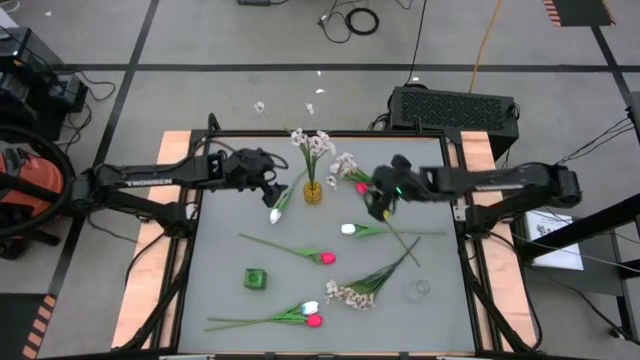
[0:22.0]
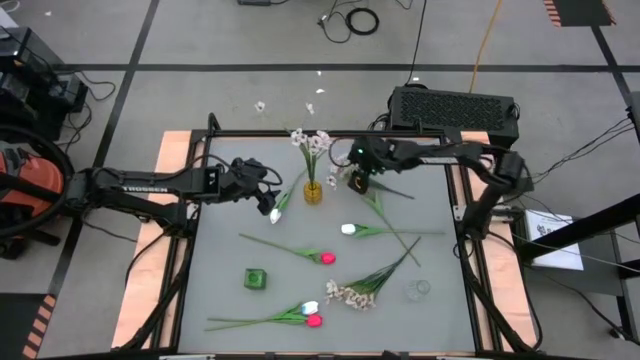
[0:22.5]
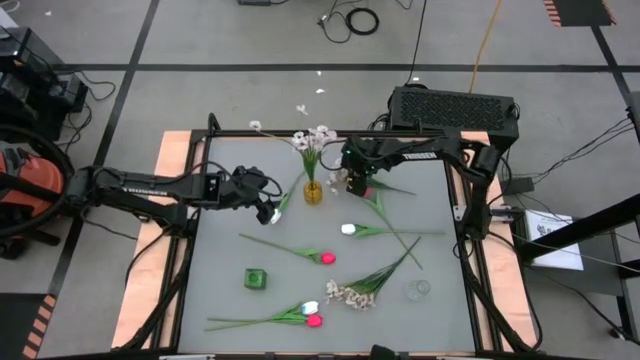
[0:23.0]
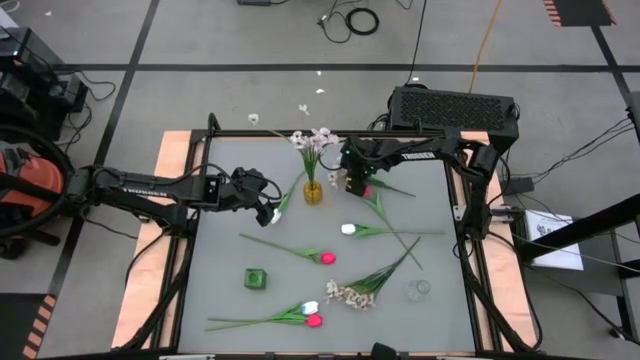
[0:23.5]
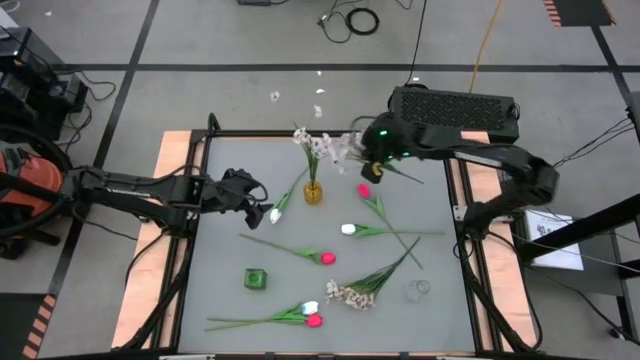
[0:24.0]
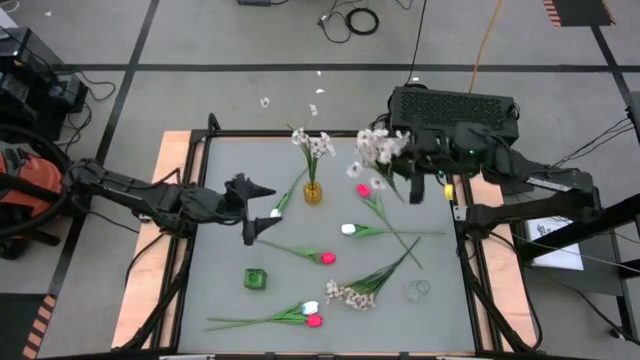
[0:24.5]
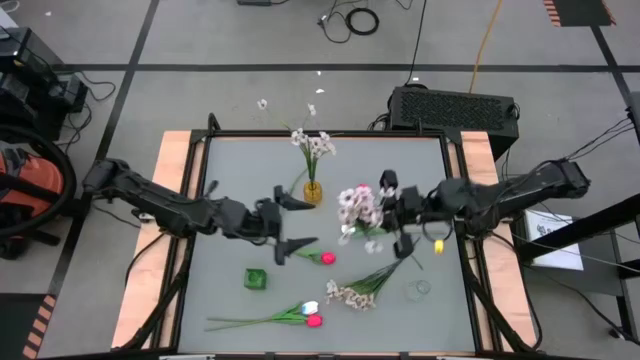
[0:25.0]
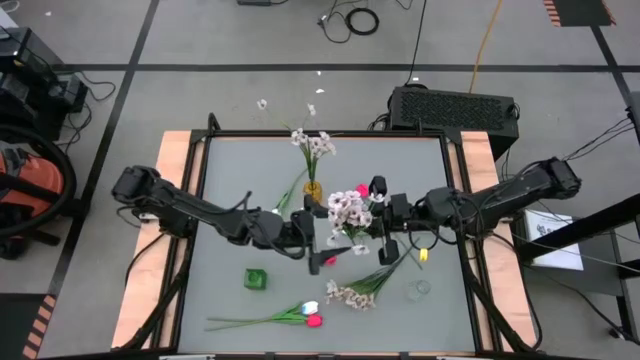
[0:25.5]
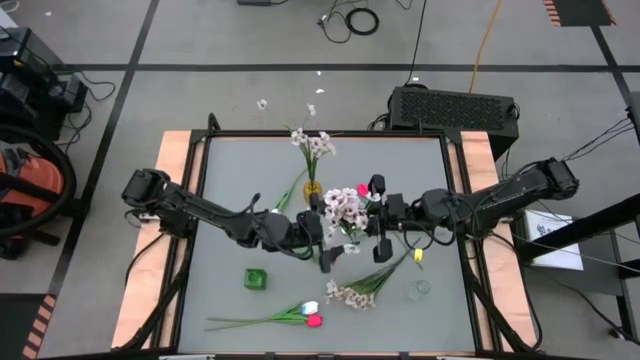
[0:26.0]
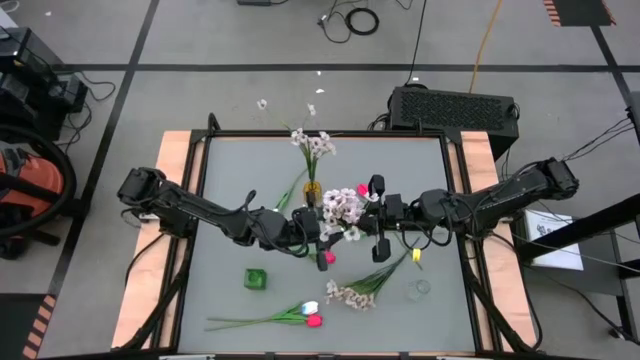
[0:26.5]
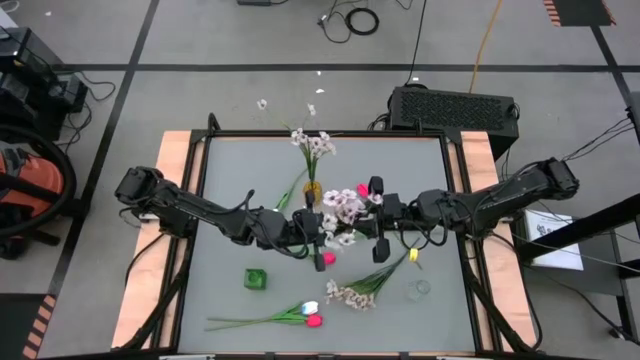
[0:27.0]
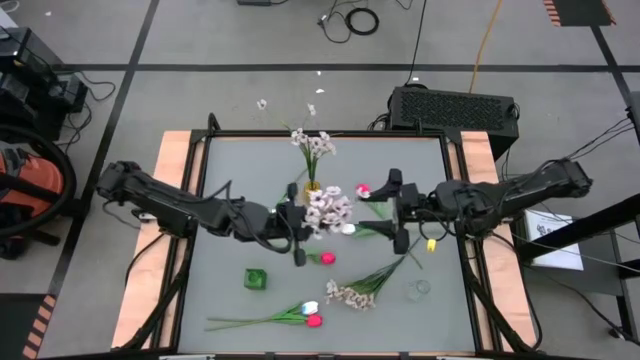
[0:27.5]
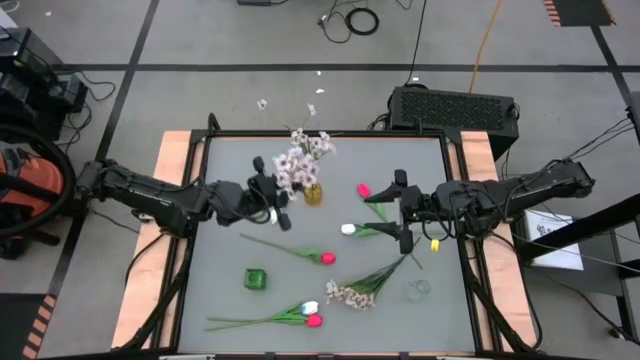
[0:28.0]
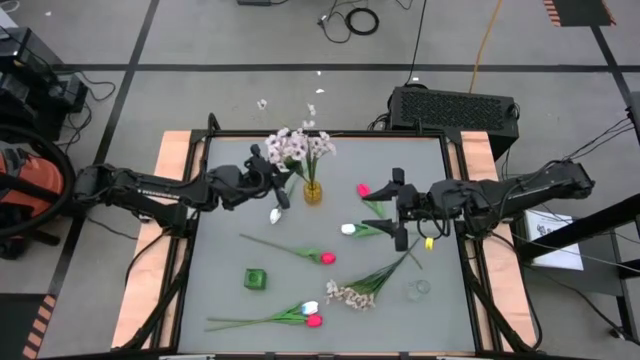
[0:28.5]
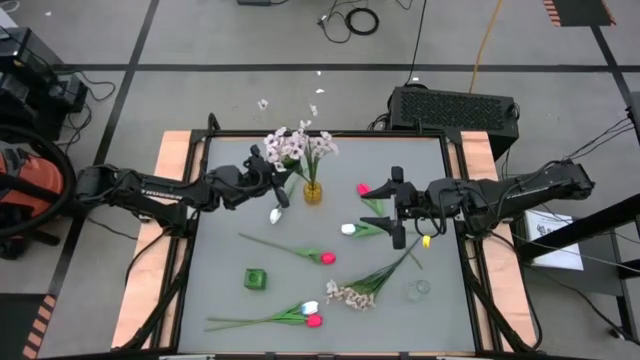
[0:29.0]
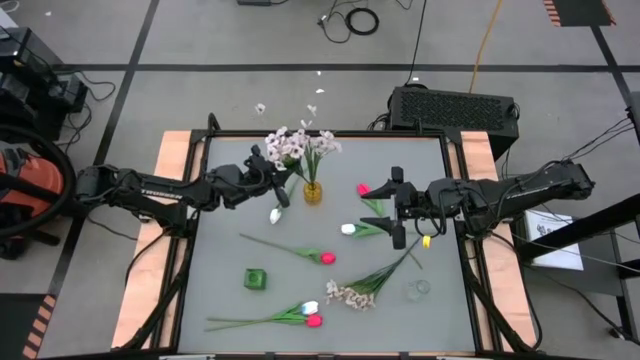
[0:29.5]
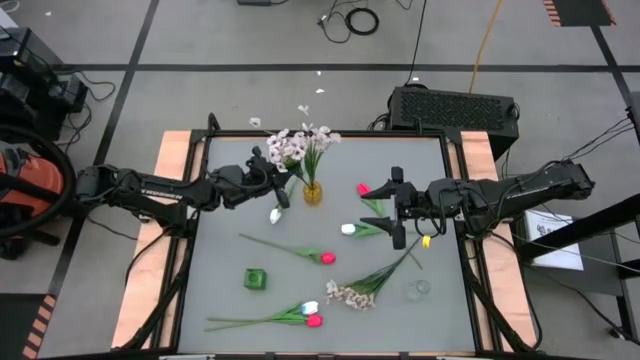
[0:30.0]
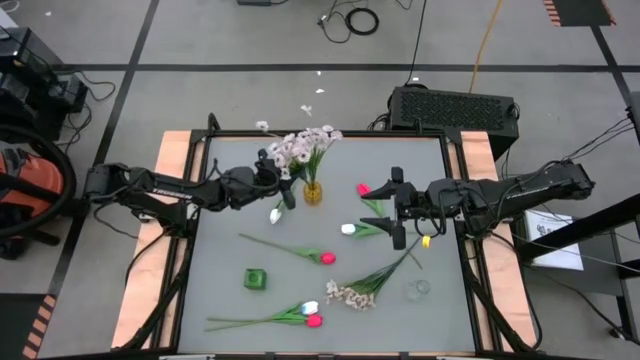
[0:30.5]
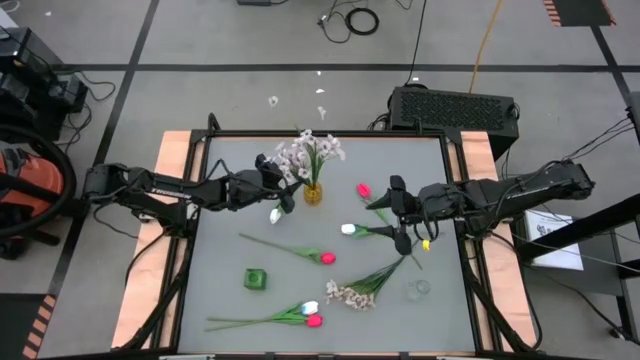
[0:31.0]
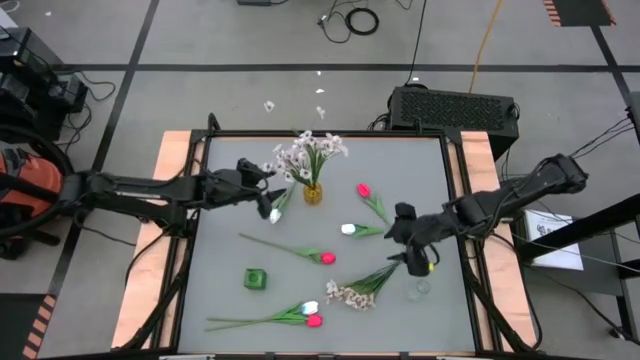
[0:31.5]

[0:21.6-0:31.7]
Task: Sort flowers into vase by color
Put the top white flowers into the yellow vase

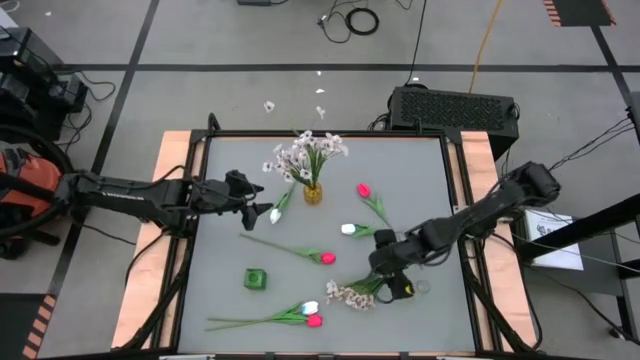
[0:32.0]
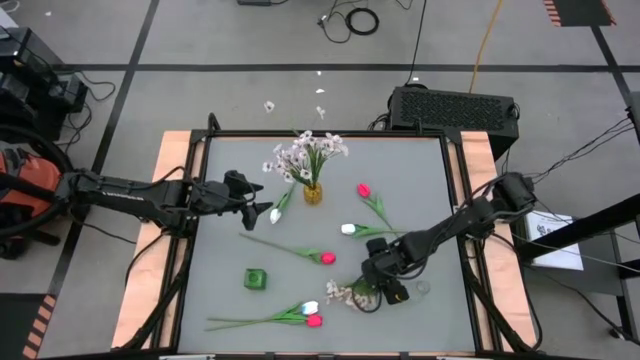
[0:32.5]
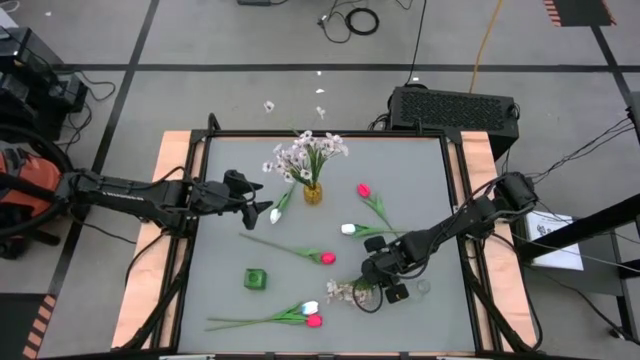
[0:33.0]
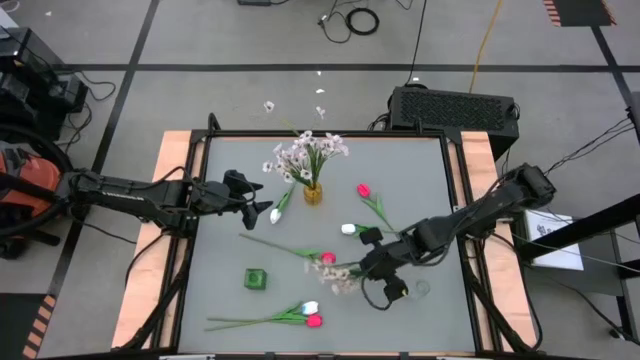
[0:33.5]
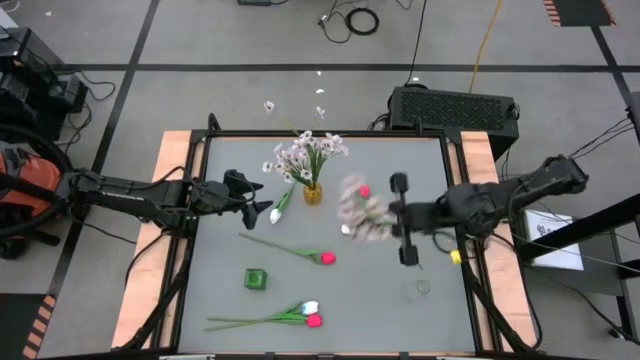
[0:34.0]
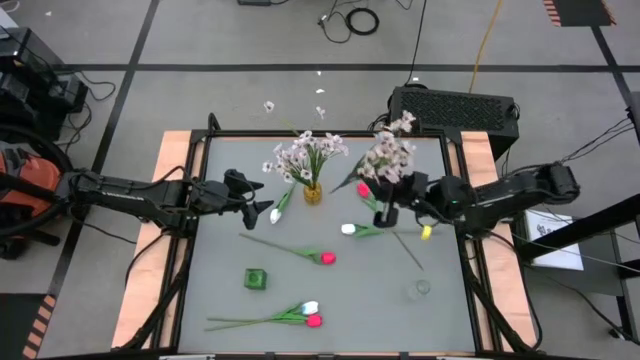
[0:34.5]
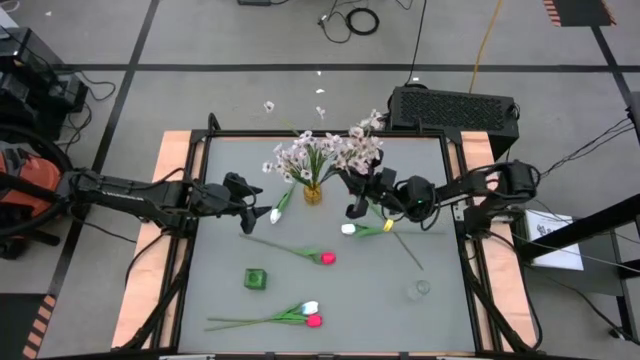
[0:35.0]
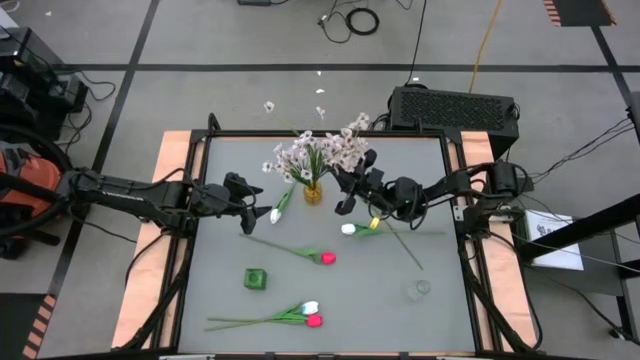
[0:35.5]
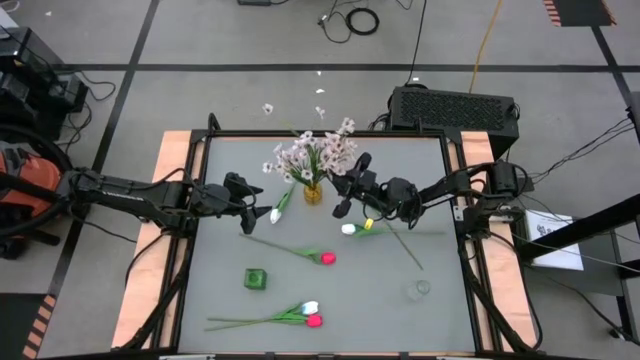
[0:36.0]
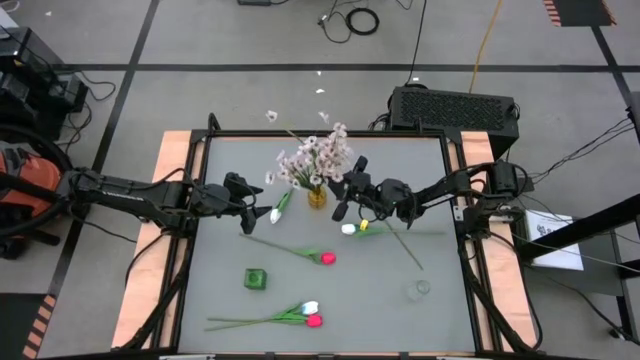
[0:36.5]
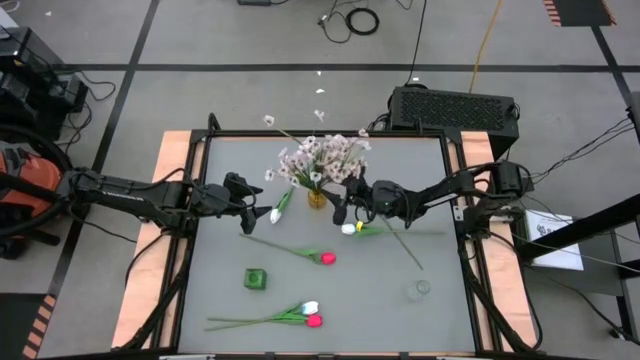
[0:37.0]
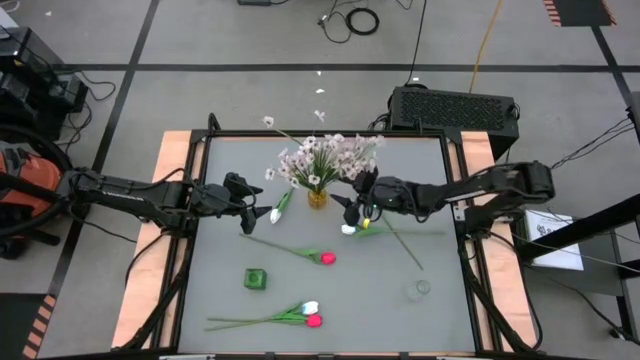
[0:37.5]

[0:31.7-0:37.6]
Put the white flowers into the yellow vase

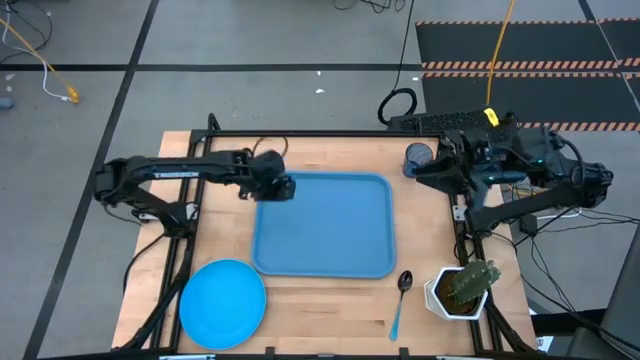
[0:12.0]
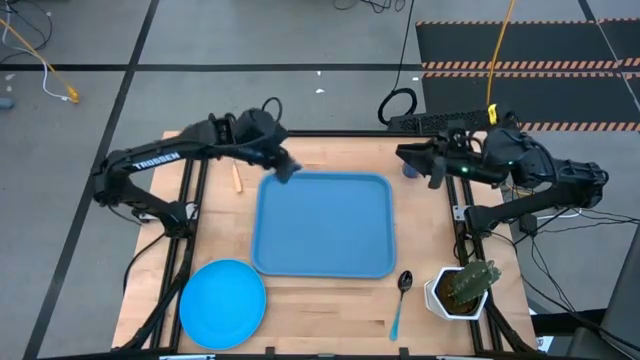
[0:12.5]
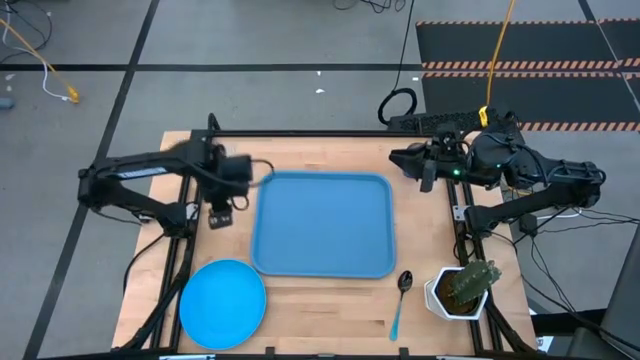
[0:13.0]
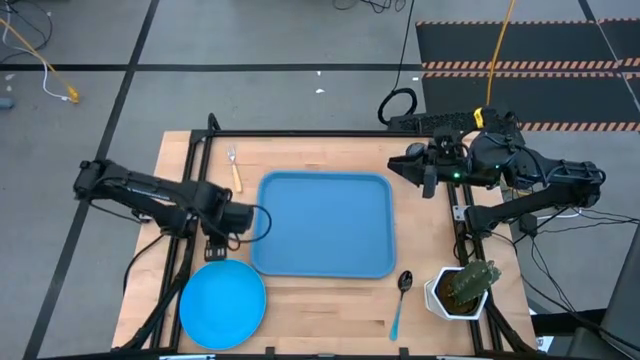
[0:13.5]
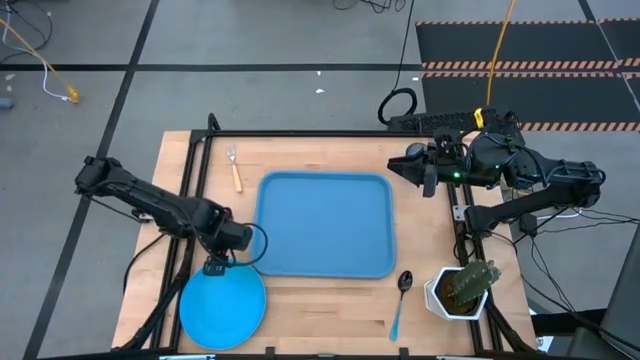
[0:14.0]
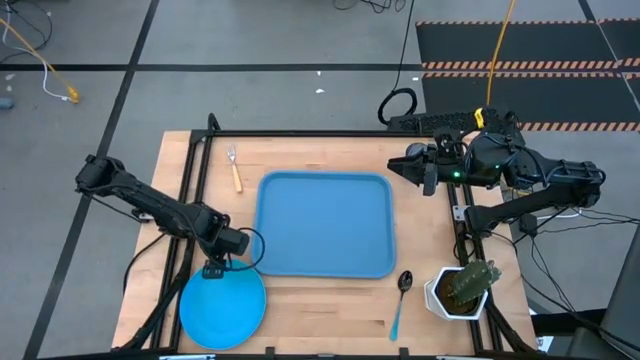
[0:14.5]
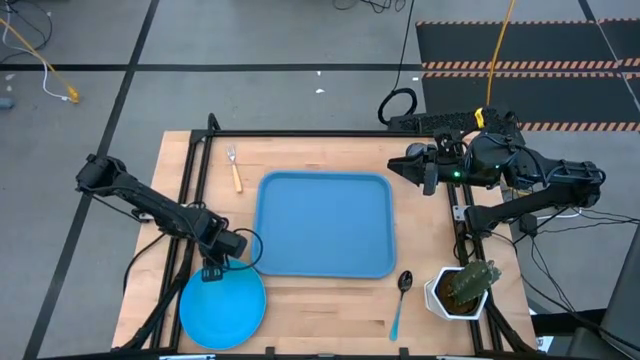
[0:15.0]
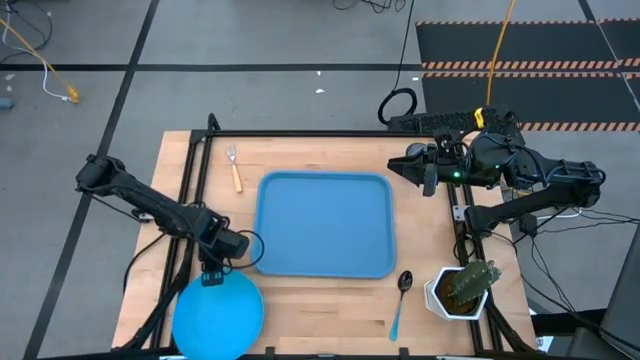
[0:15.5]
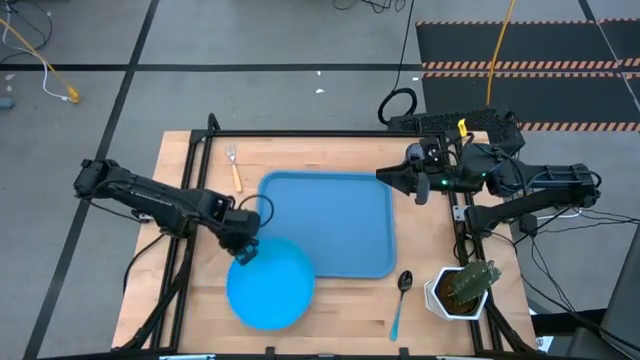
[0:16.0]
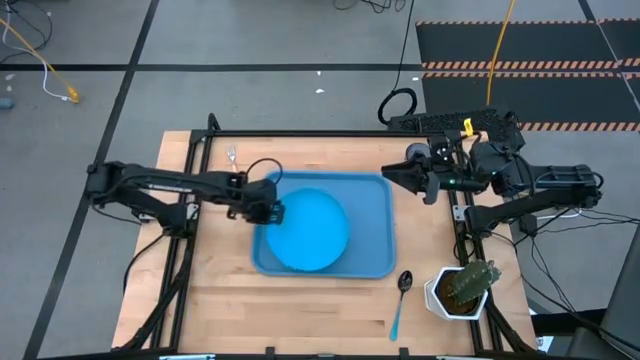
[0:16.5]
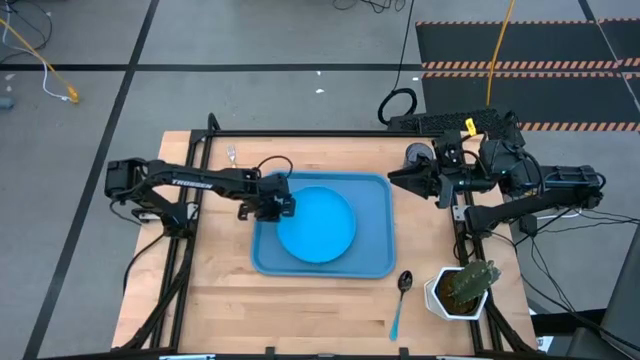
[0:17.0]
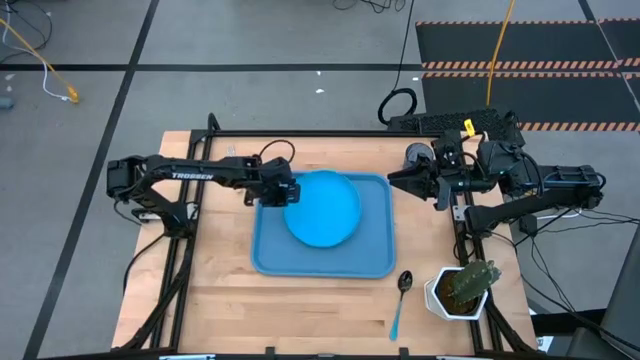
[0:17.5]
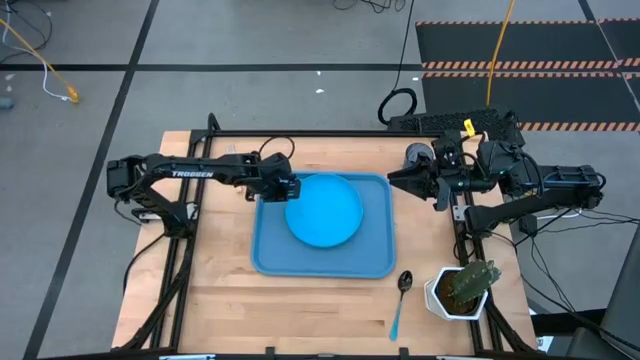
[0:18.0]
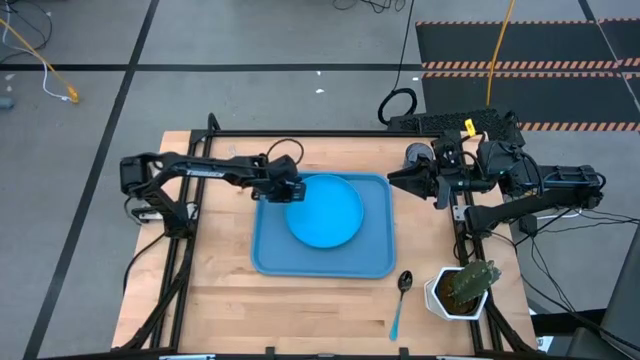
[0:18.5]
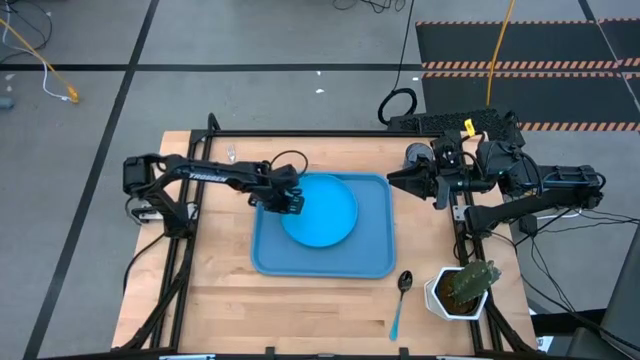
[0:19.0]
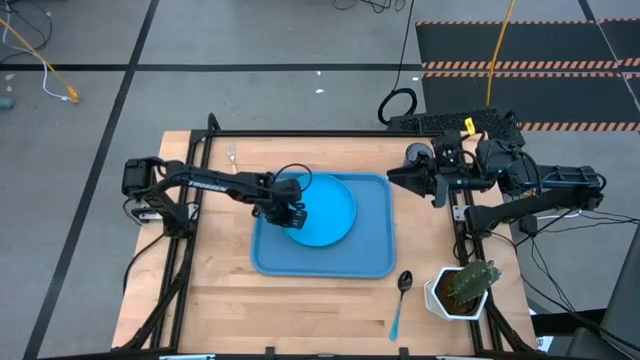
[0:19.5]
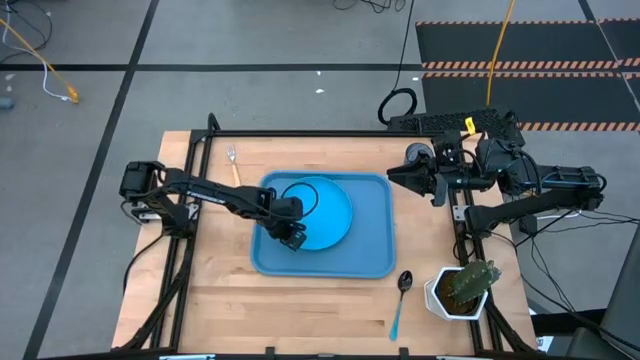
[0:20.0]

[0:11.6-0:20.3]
Task: Pick and place plate/cup/fork/spoon on tray
Put the light blue plate on the blue tray
